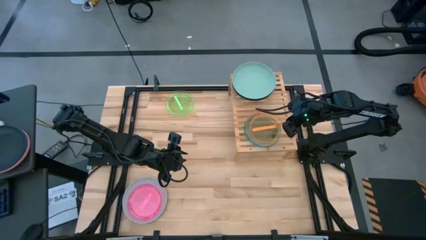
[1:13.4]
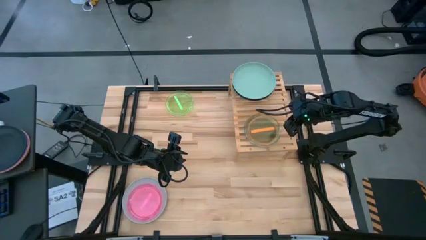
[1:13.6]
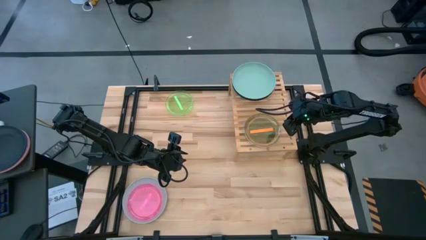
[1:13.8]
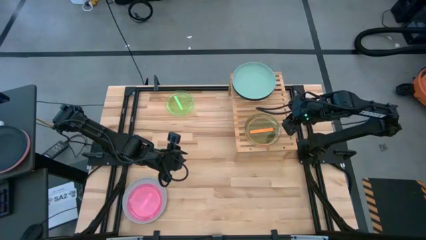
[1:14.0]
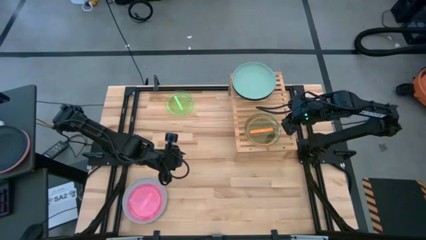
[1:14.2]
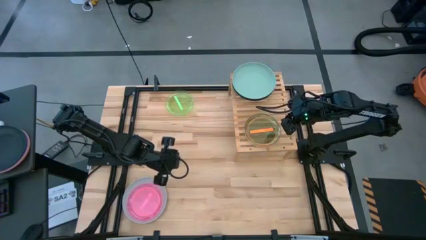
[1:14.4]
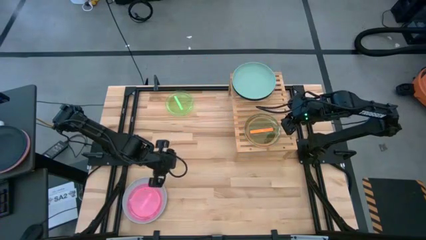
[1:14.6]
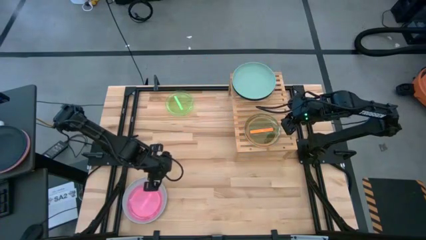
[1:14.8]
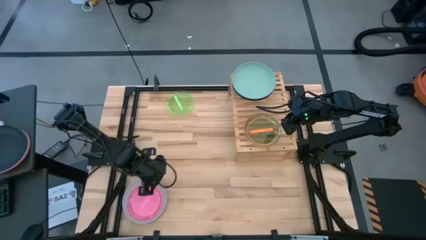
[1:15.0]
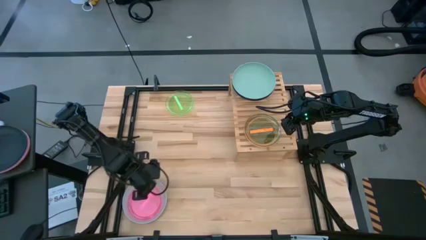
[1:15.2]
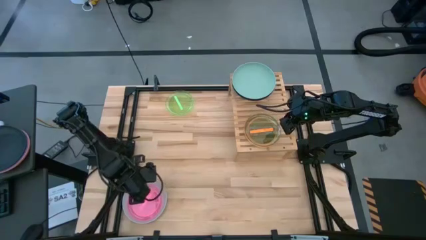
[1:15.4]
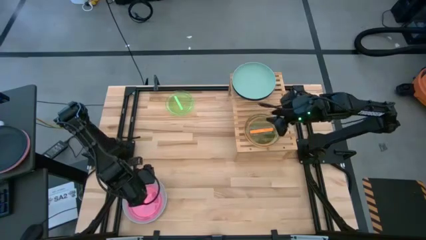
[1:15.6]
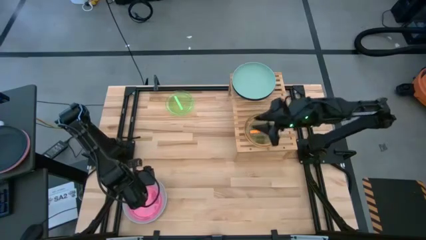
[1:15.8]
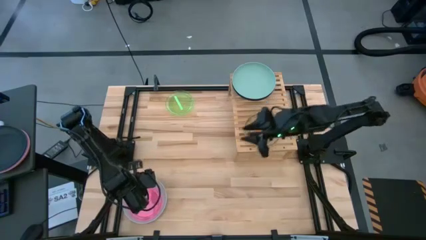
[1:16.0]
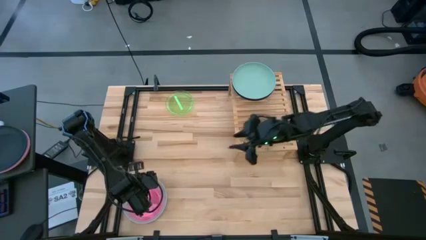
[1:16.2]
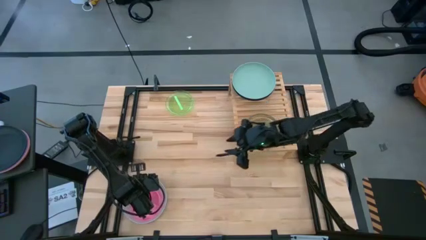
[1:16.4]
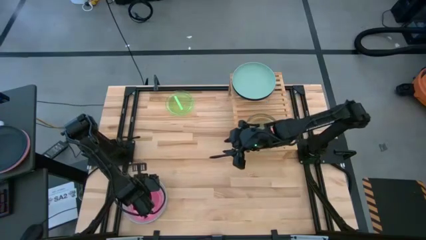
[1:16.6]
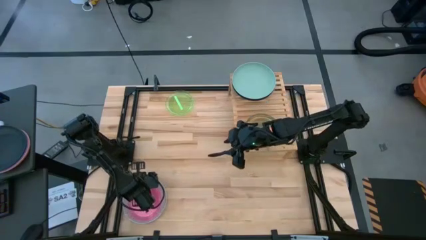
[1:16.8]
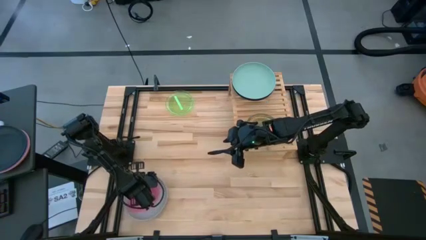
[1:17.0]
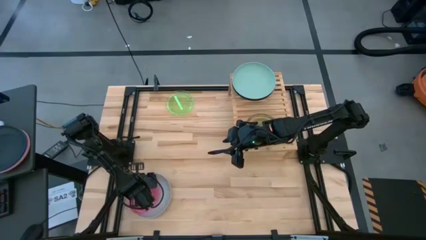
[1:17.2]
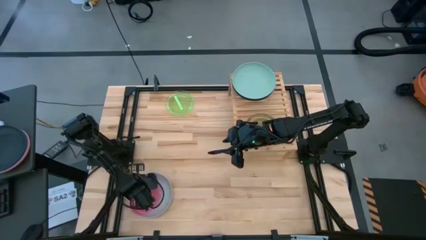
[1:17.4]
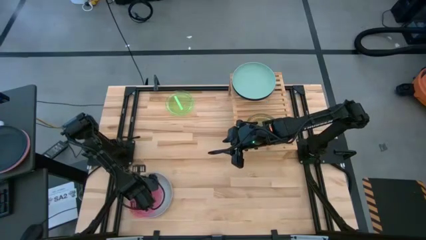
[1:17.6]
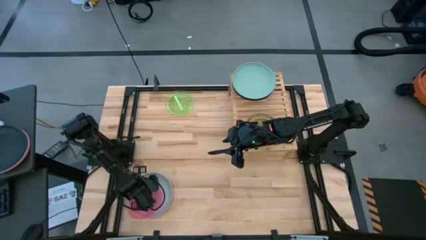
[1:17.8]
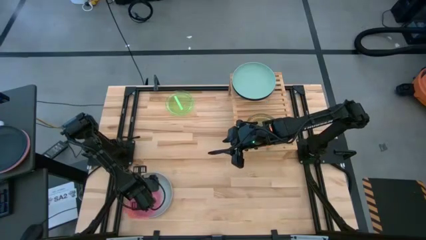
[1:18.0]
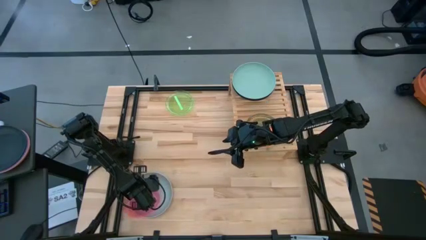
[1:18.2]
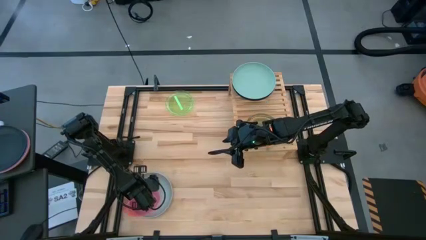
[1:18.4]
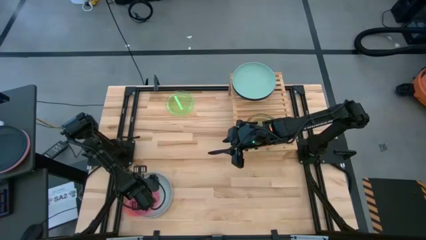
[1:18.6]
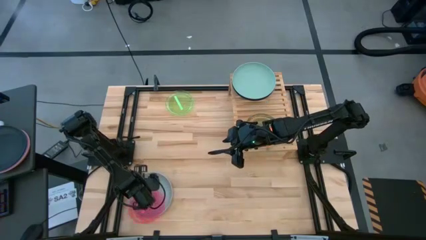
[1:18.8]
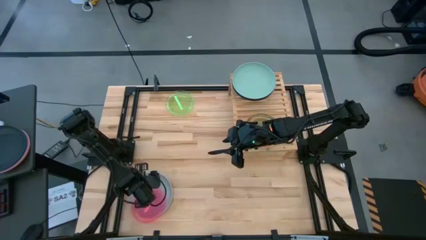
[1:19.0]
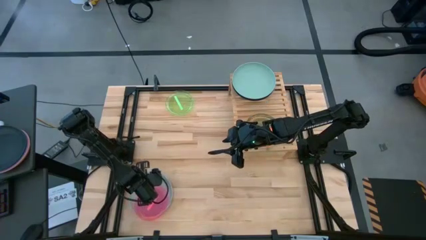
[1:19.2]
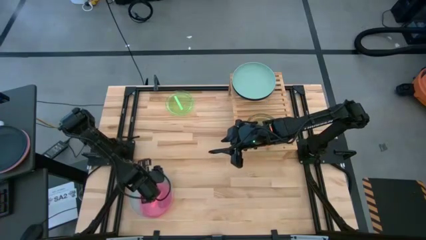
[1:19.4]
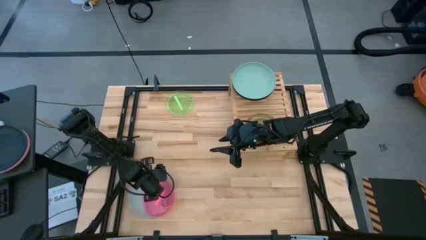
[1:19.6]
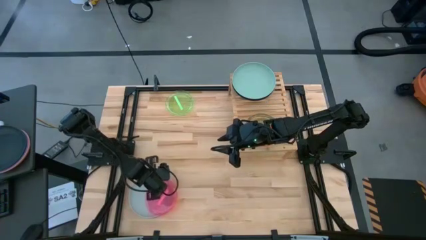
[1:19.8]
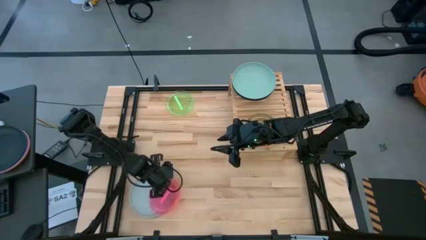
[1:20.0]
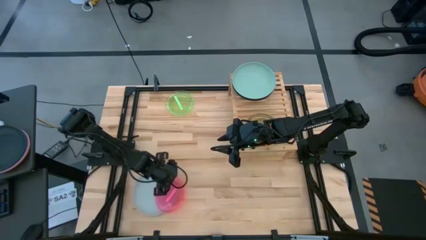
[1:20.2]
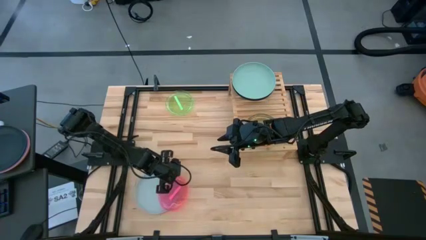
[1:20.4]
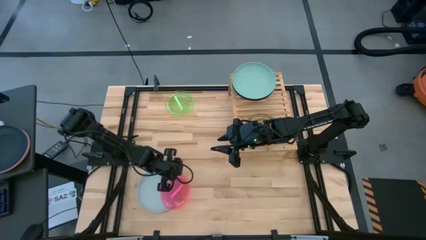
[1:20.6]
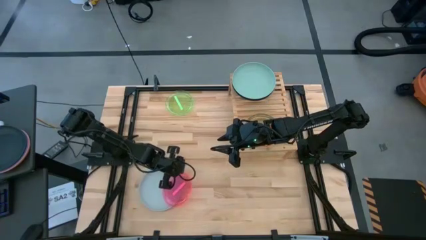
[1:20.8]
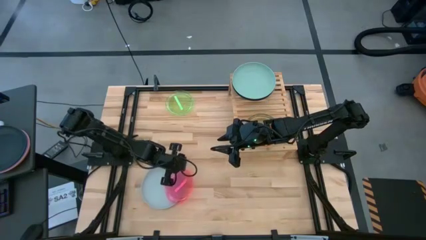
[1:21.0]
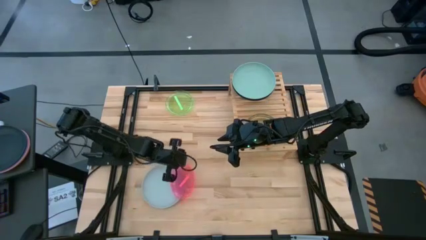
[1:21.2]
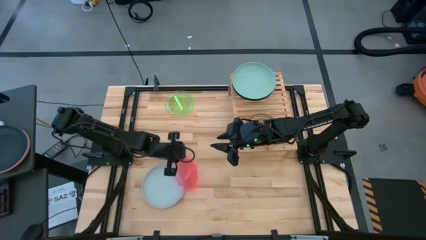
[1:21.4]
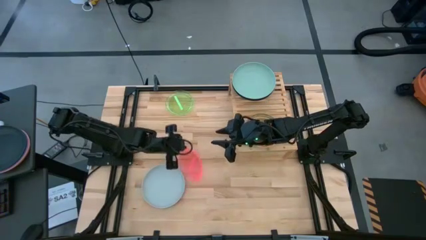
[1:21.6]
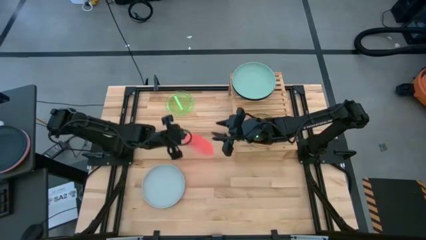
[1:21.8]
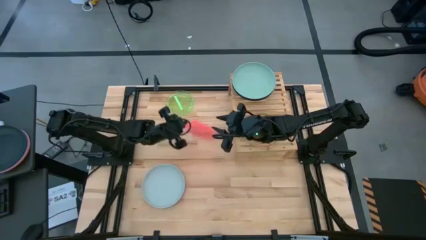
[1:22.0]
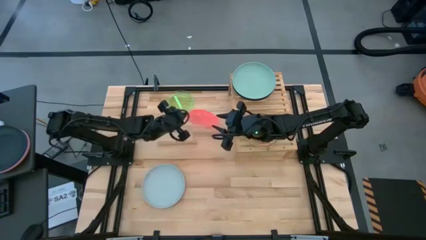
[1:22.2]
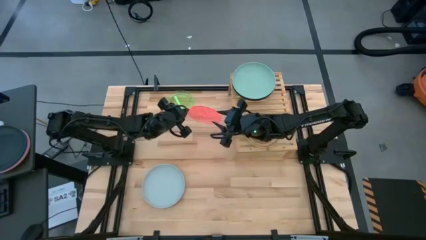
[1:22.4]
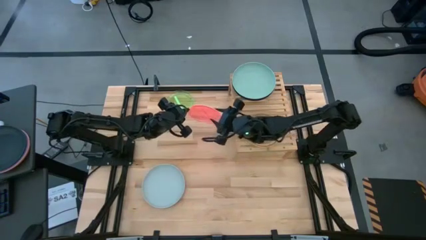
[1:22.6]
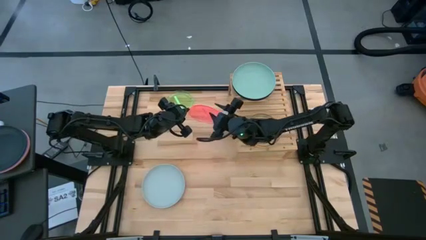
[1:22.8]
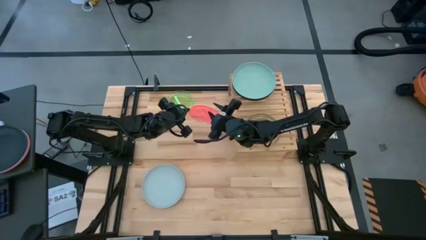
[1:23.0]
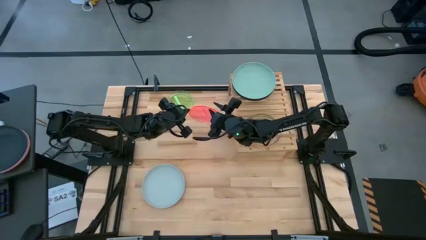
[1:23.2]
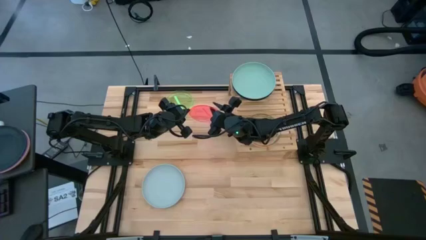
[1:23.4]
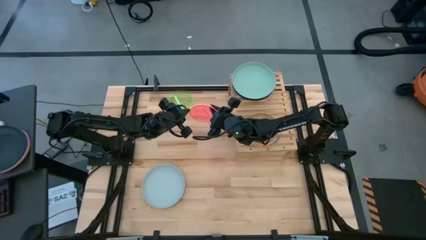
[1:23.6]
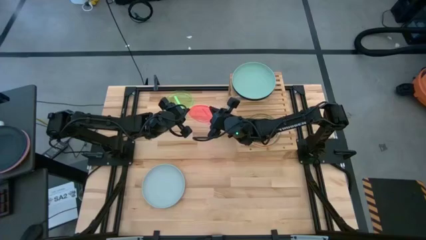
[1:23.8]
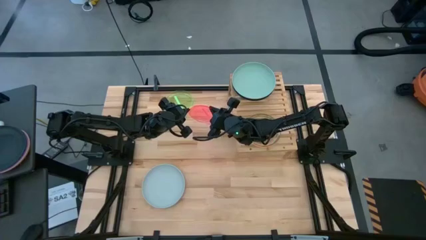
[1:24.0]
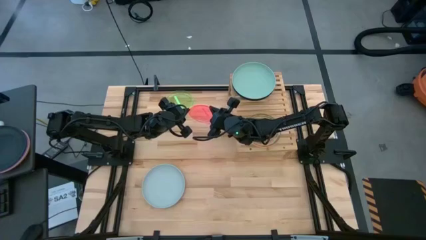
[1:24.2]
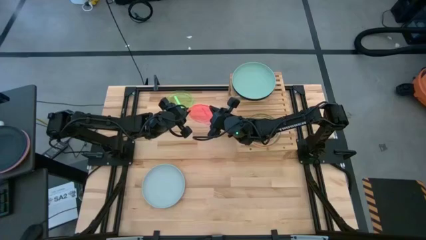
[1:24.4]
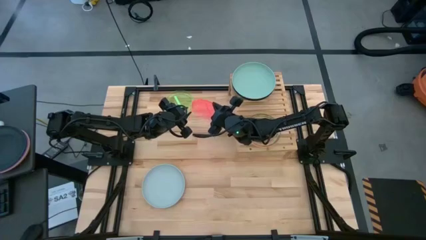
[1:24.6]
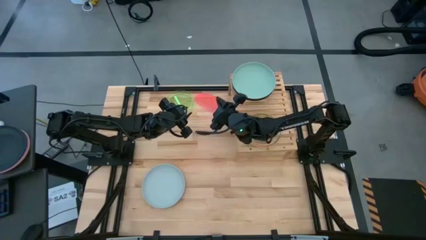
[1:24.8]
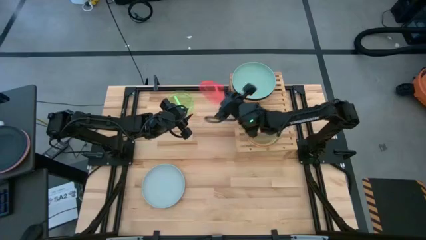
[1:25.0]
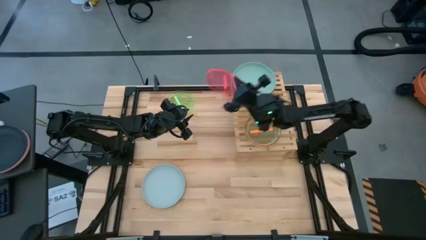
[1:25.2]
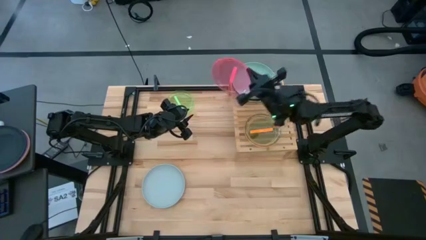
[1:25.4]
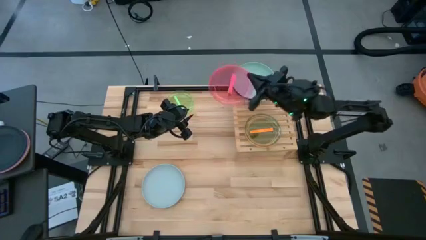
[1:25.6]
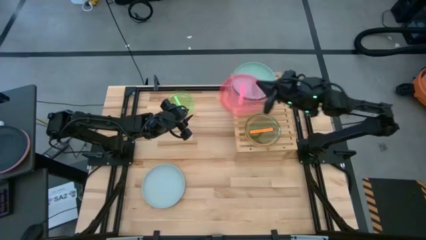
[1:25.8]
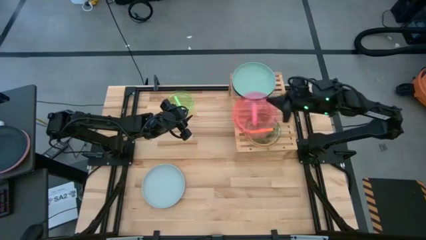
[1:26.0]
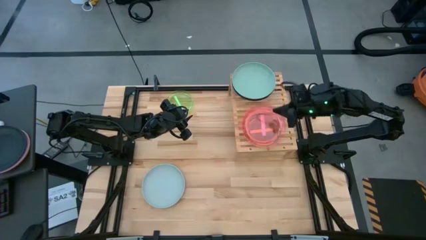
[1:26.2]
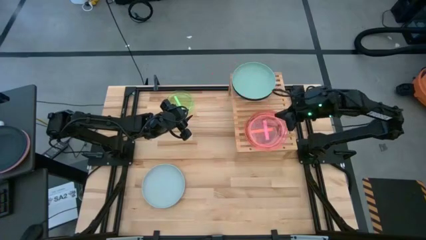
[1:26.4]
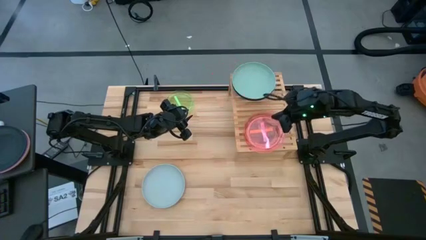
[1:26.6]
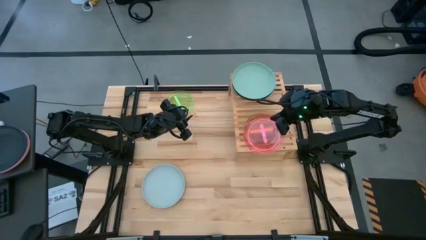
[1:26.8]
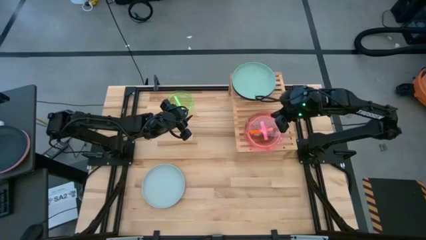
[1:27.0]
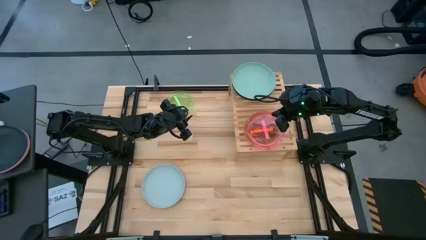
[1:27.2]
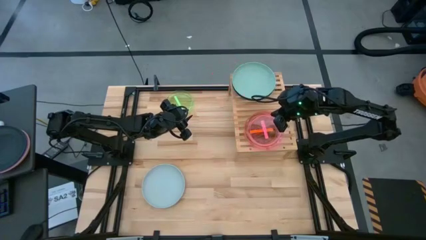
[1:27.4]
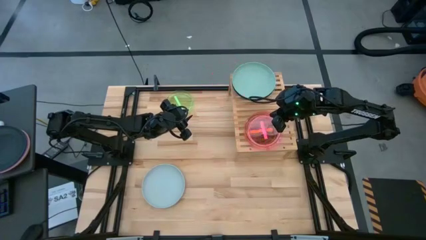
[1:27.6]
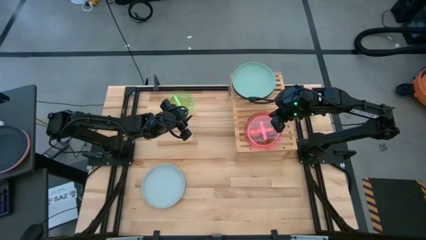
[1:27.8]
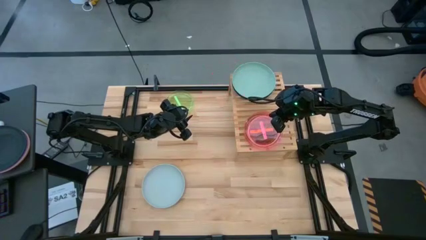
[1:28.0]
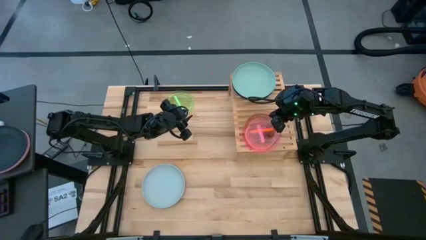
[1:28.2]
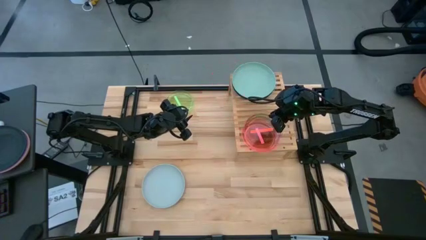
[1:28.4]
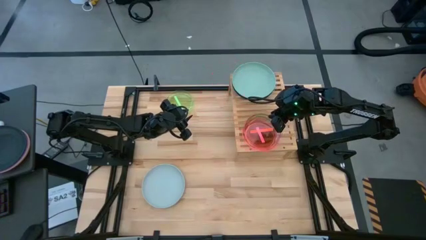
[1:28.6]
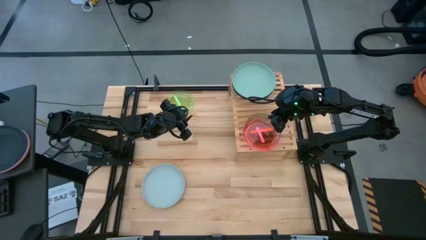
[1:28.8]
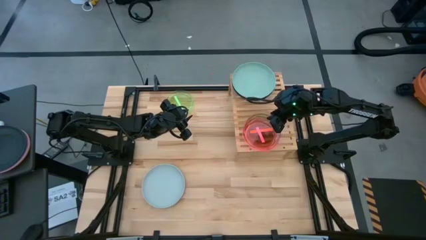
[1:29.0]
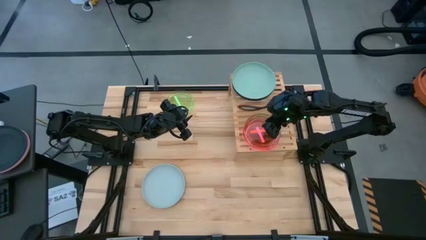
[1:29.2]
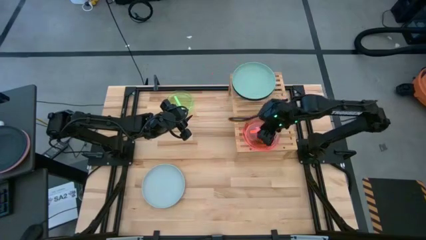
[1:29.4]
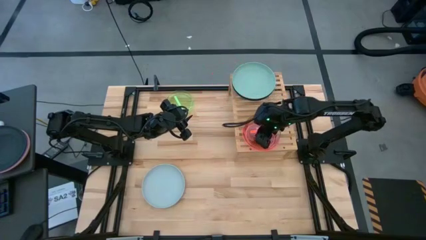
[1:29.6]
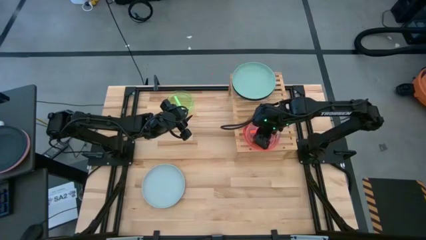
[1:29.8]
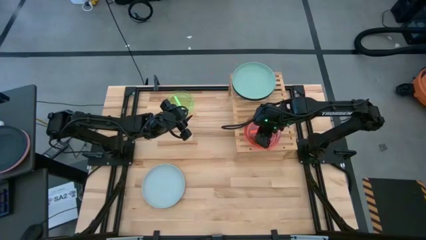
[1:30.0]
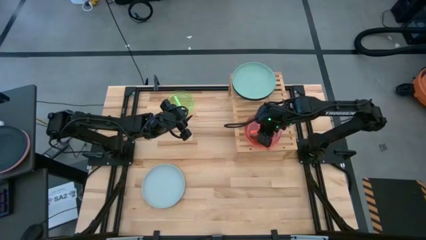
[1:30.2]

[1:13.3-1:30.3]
Task: Place and stack plates onto a shelf
Stack the light pink plate on top of the light orange plate on the shelf
